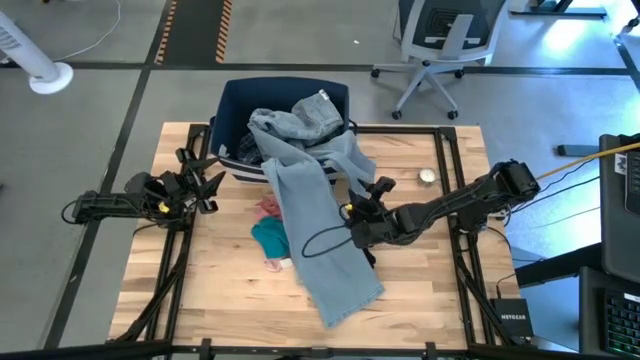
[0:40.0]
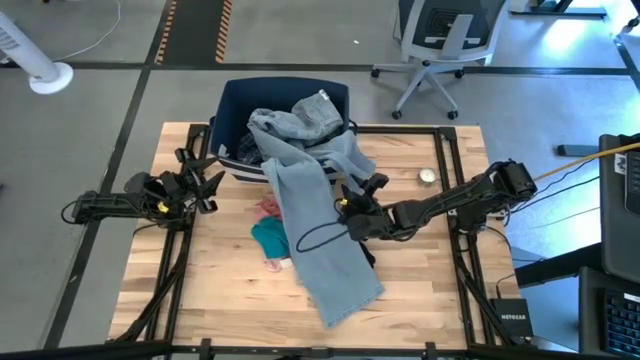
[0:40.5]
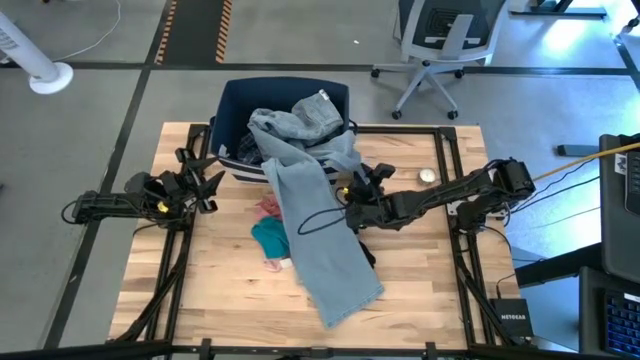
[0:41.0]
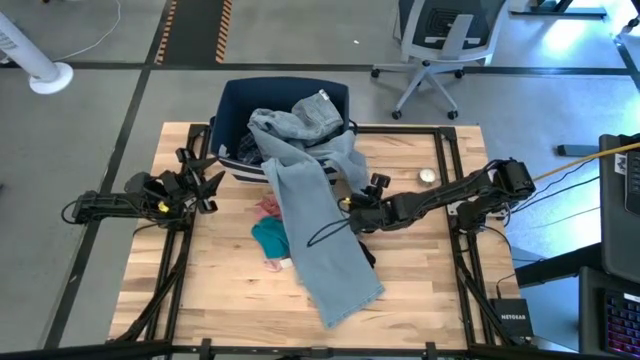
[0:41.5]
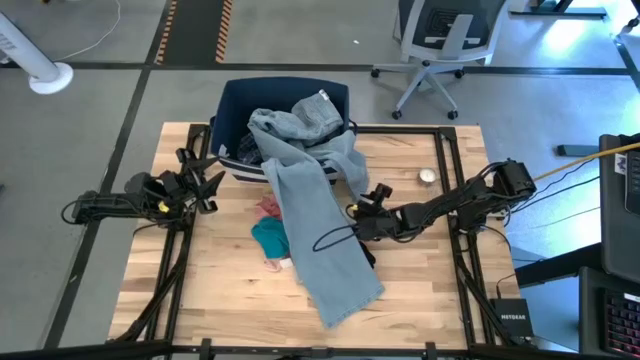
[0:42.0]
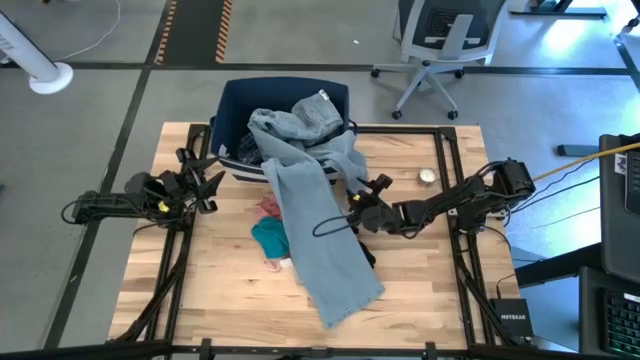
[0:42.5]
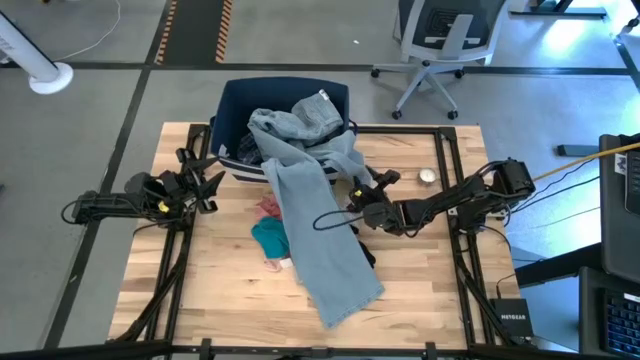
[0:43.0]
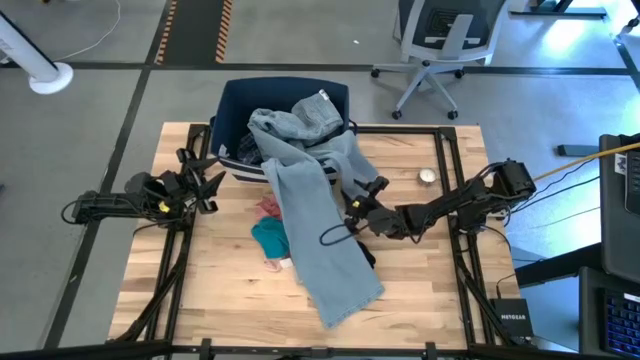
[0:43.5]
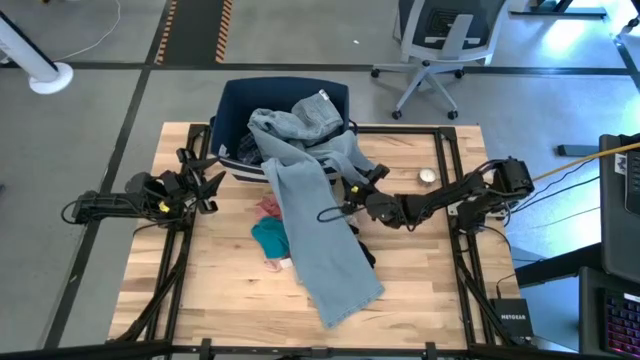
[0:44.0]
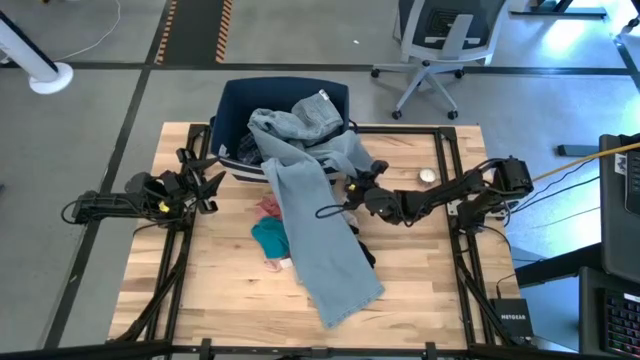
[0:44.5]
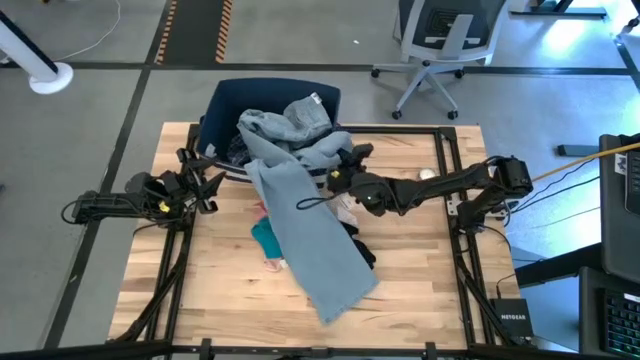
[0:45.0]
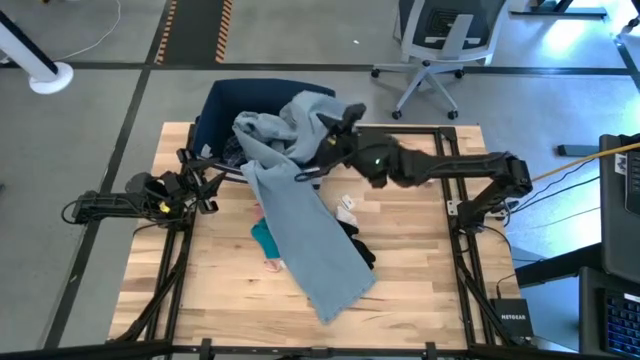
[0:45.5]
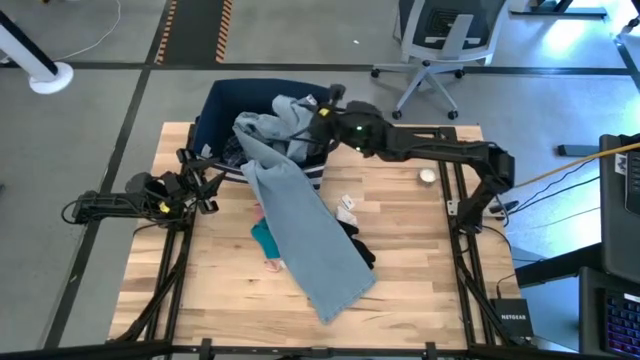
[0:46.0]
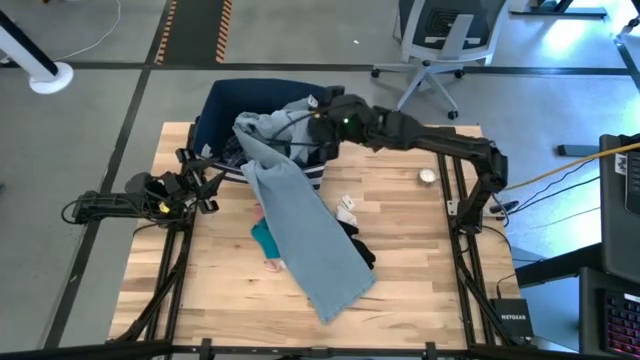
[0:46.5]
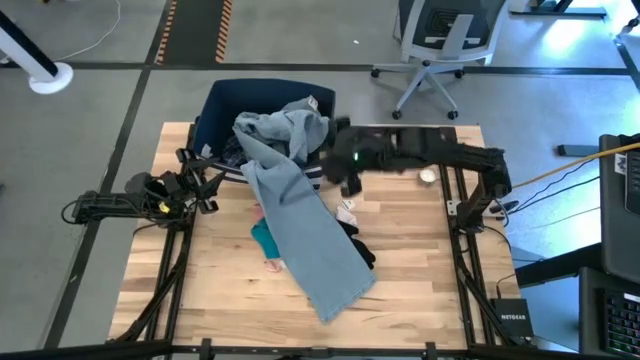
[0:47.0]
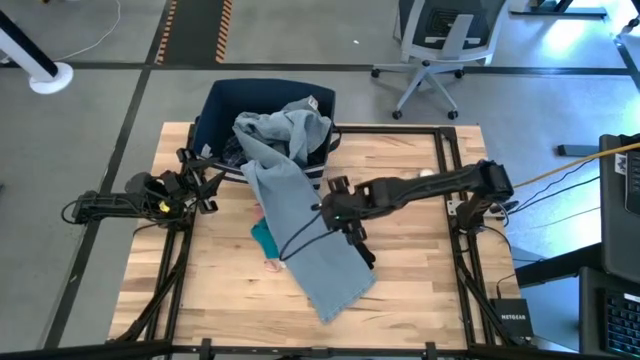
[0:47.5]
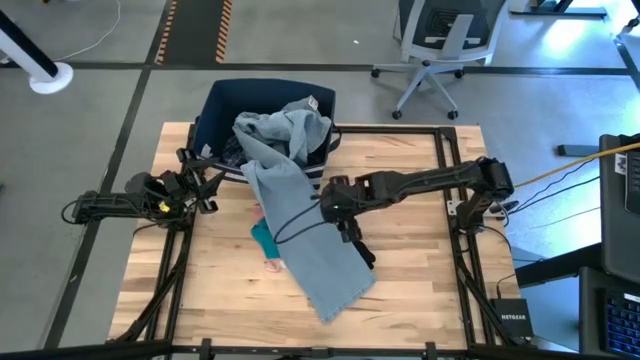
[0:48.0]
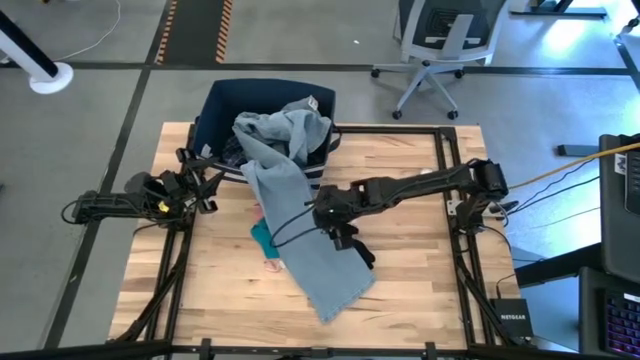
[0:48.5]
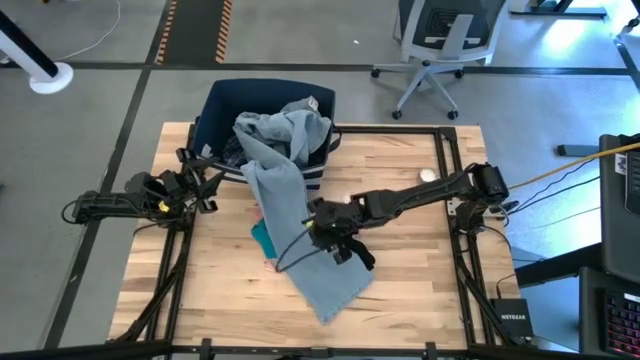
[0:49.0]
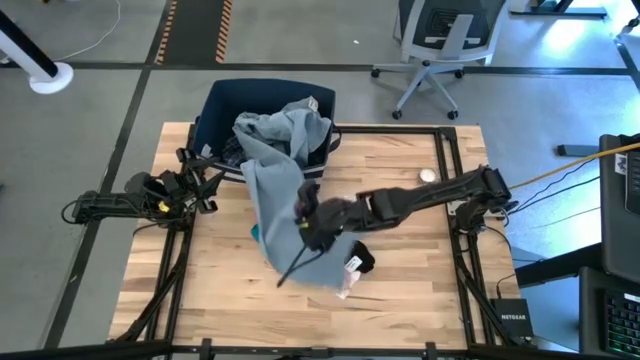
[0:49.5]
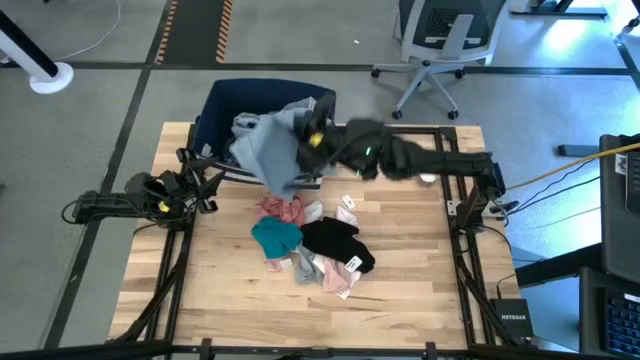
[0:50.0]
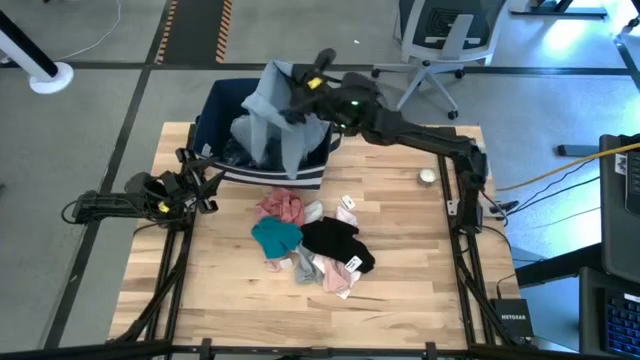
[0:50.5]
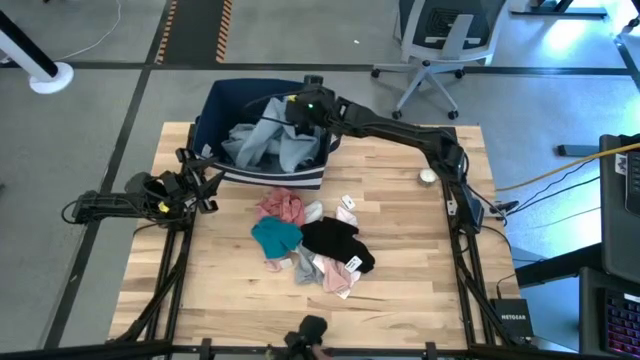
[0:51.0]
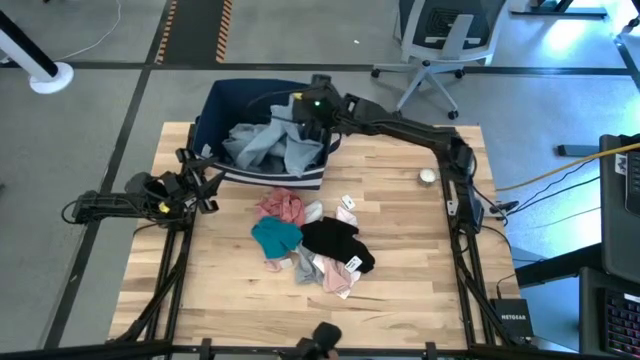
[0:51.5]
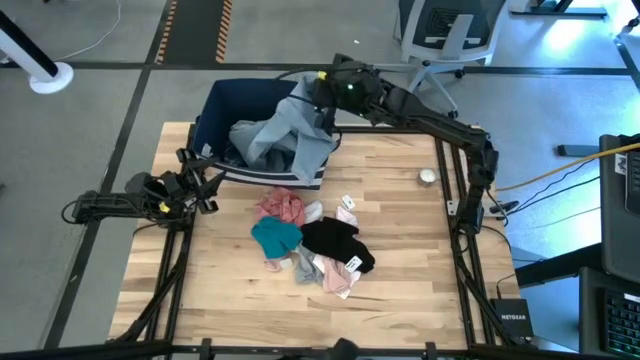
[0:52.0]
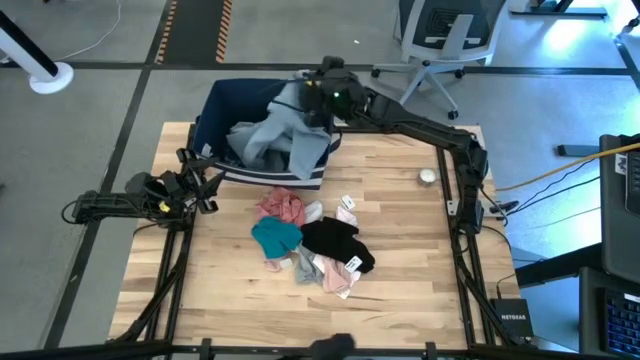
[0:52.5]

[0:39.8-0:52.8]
Task: Sort clothes
Put the blue jeans into the blue laundry organizer

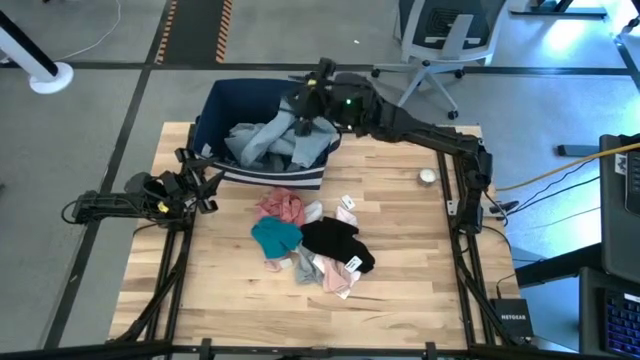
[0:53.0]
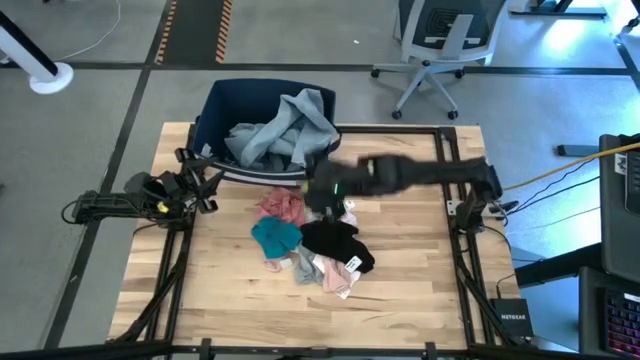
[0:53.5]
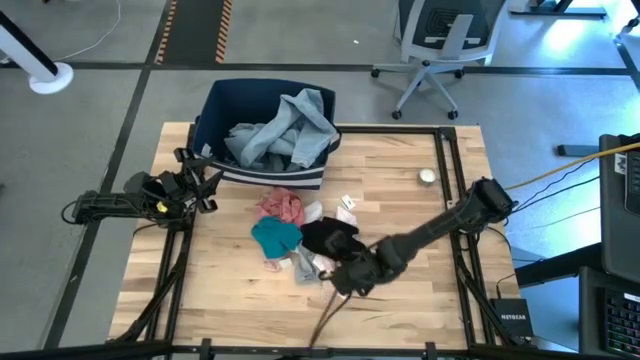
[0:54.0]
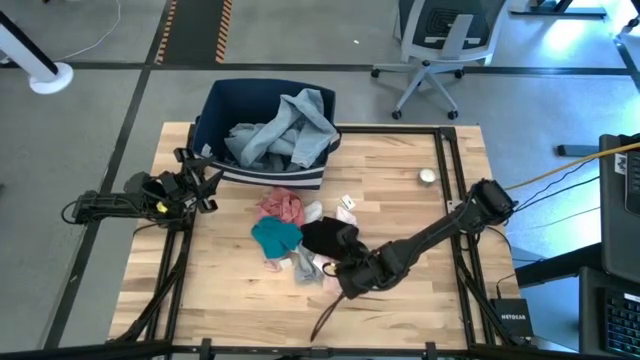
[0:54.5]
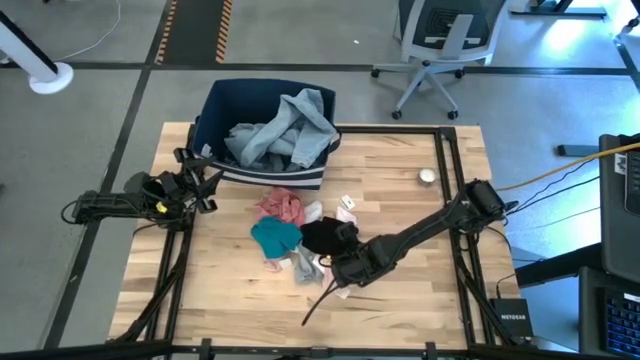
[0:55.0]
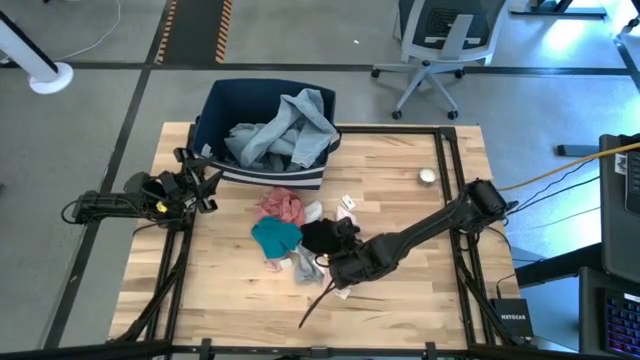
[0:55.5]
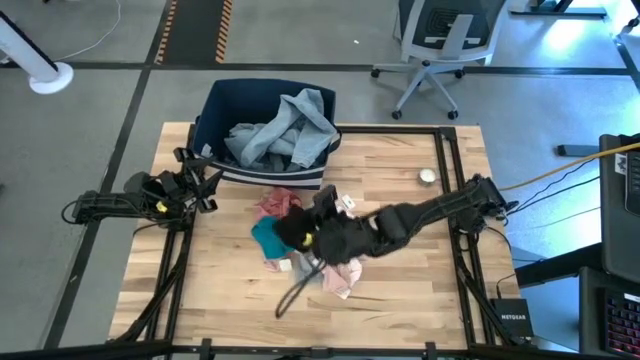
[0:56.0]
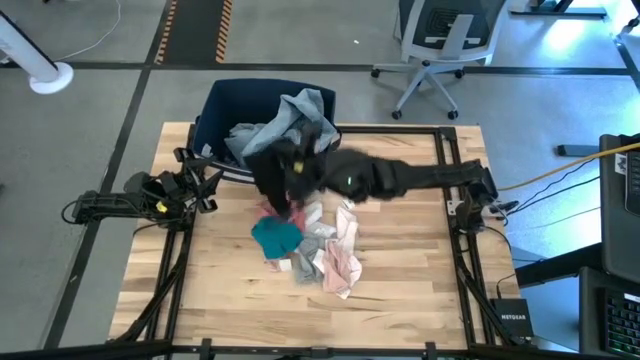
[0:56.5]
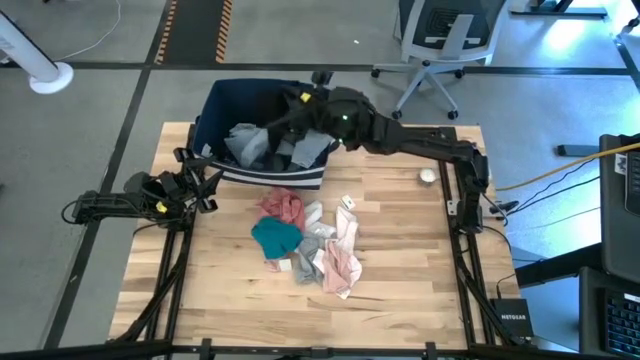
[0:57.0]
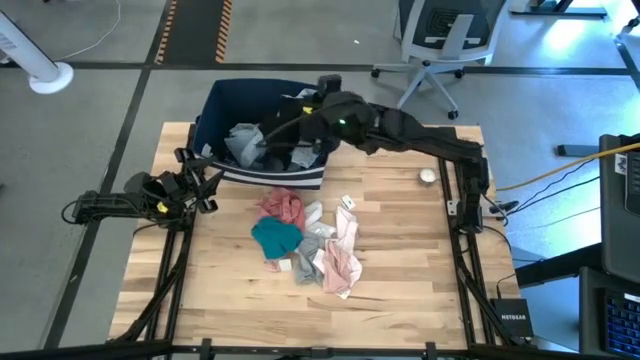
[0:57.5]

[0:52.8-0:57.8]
Put the black pants into the blue laundry organizer

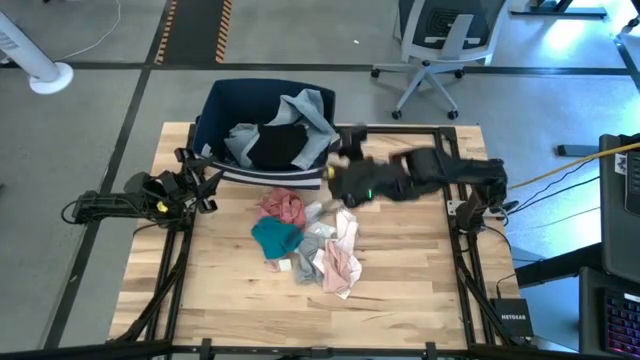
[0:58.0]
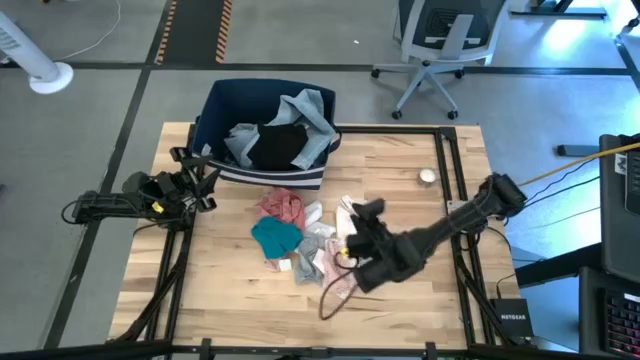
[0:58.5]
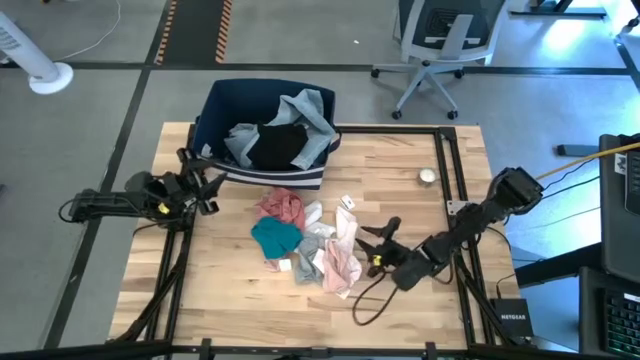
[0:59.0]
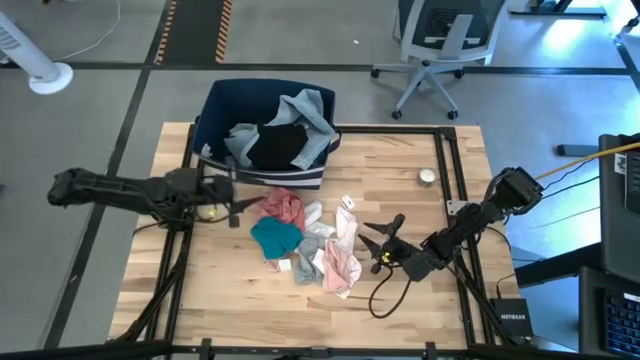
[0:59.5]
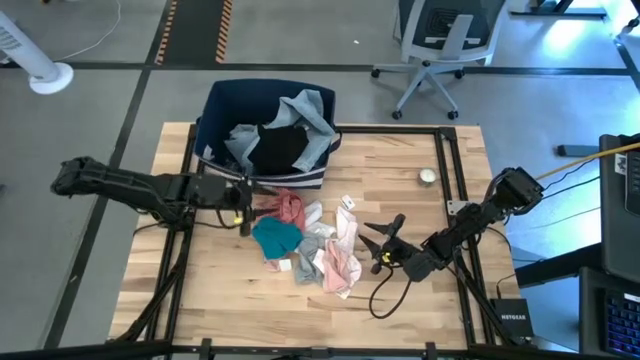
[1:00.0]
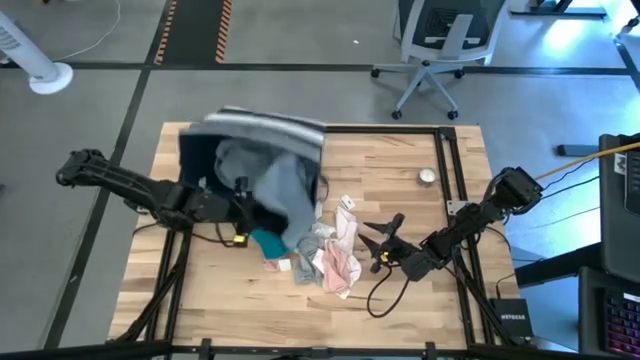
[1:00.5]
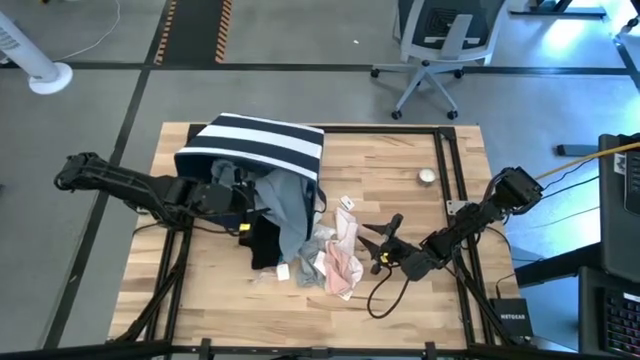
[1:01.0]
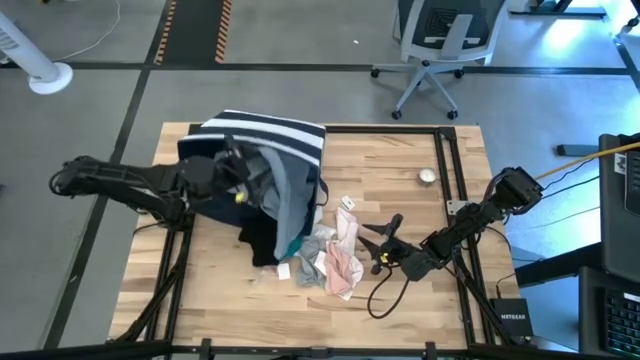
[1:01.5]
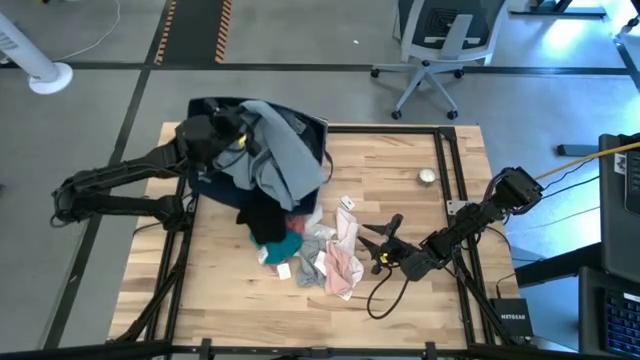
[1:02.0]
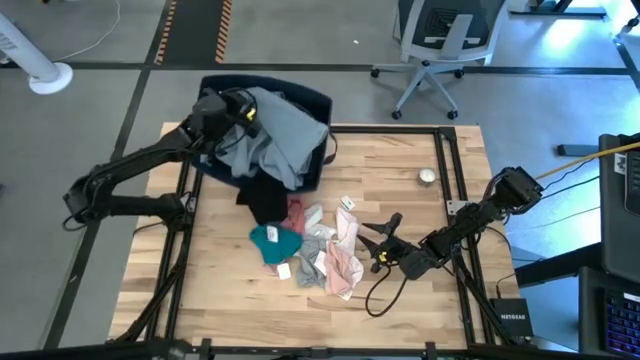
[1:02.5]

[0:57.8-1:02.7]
Adjust the blue laundry organizer
